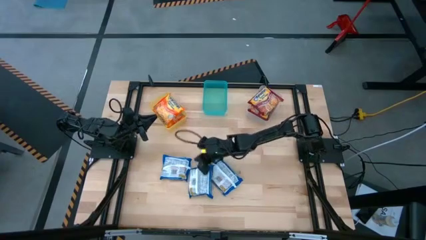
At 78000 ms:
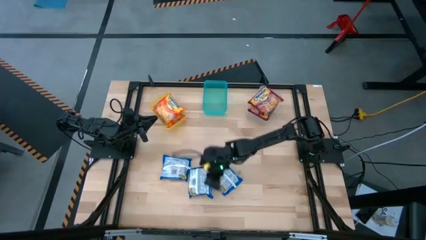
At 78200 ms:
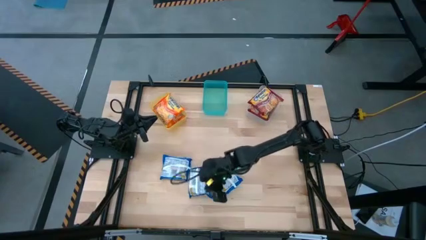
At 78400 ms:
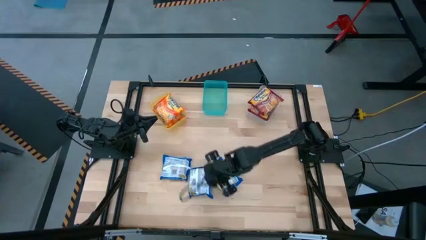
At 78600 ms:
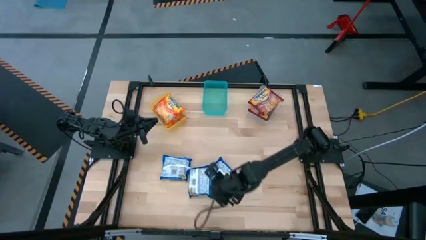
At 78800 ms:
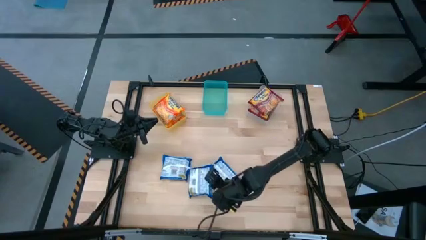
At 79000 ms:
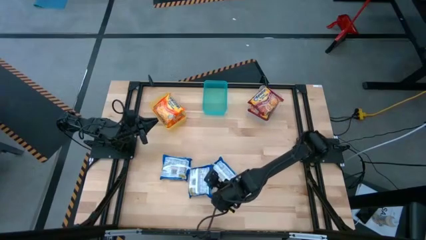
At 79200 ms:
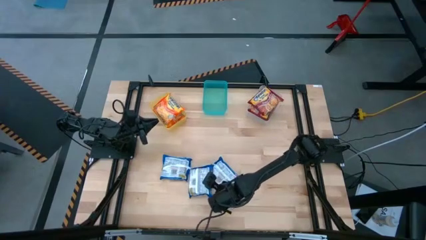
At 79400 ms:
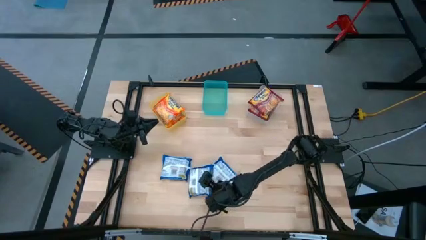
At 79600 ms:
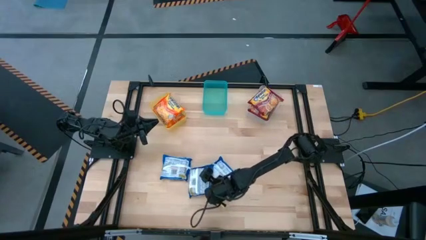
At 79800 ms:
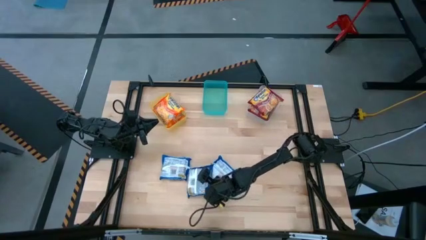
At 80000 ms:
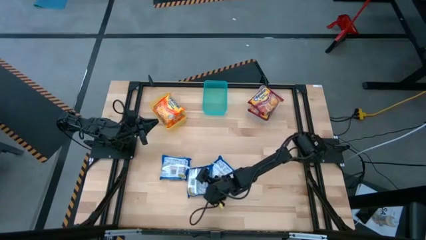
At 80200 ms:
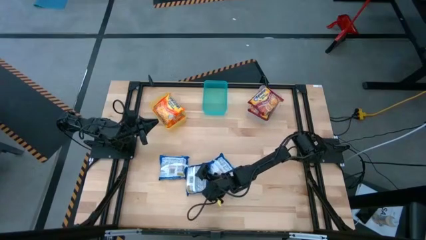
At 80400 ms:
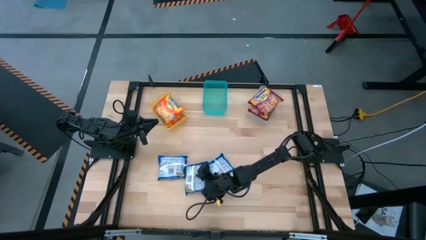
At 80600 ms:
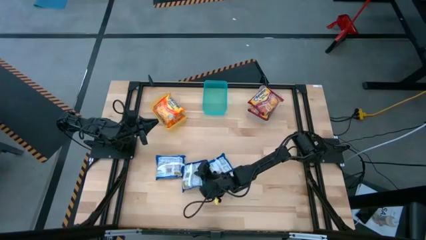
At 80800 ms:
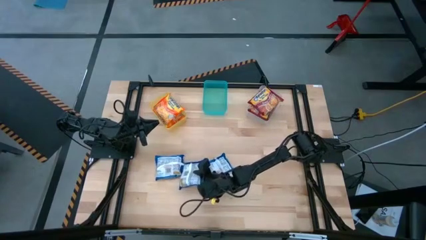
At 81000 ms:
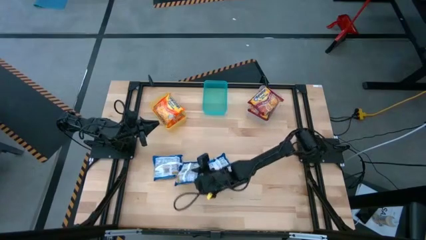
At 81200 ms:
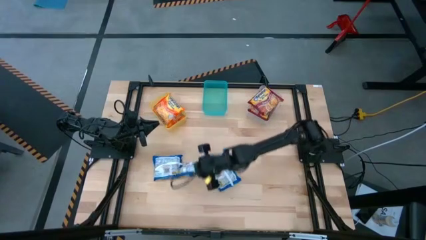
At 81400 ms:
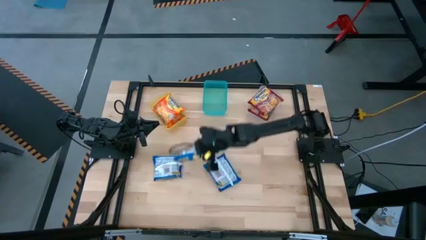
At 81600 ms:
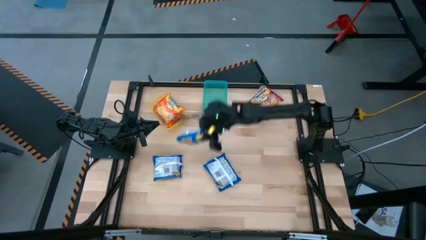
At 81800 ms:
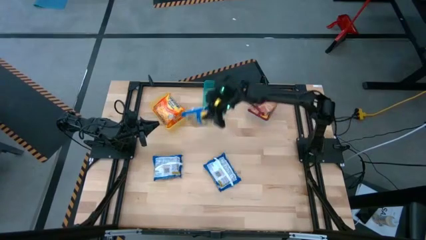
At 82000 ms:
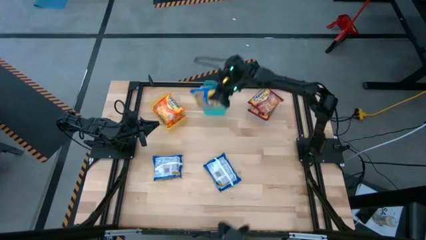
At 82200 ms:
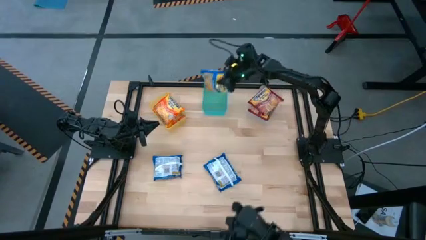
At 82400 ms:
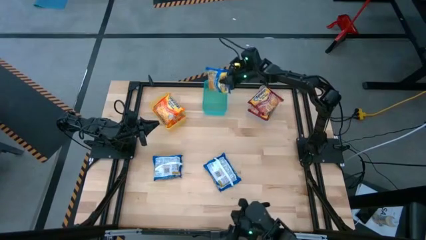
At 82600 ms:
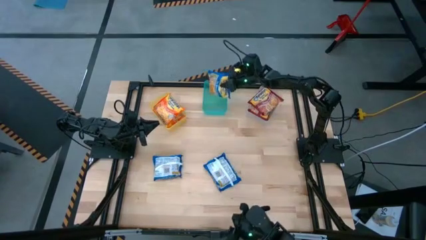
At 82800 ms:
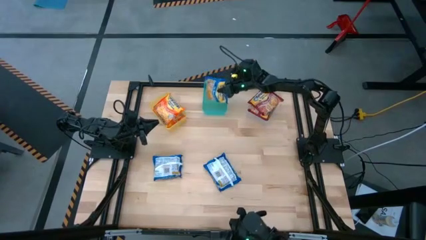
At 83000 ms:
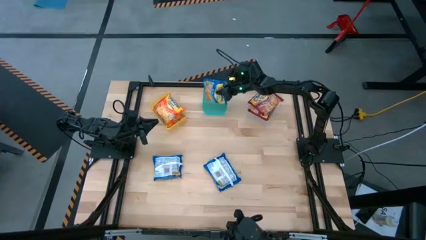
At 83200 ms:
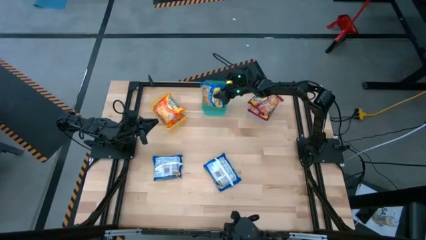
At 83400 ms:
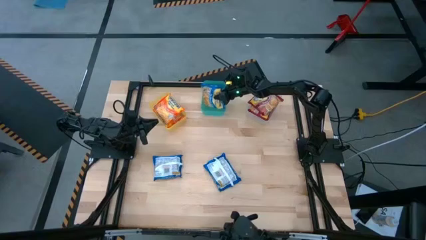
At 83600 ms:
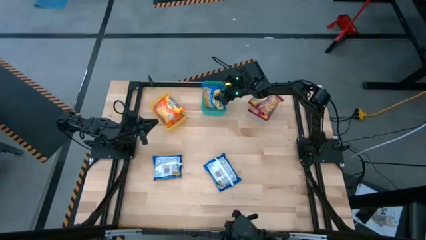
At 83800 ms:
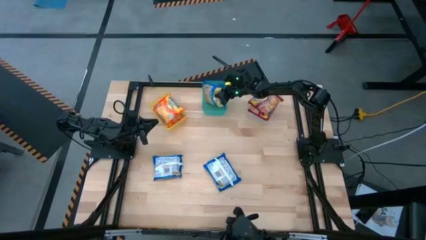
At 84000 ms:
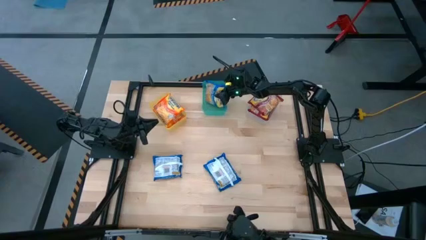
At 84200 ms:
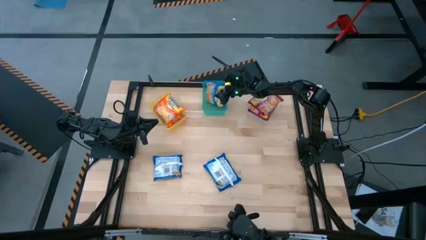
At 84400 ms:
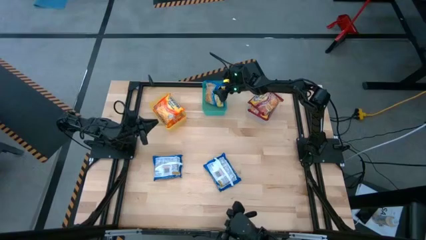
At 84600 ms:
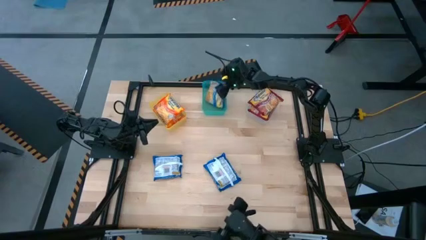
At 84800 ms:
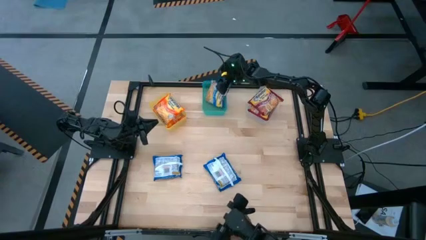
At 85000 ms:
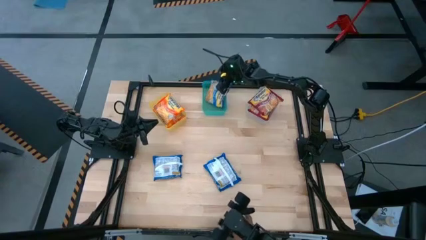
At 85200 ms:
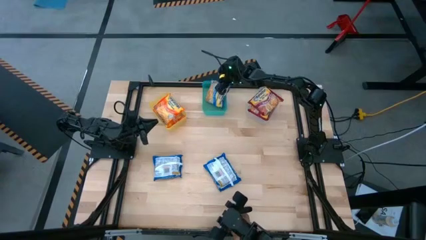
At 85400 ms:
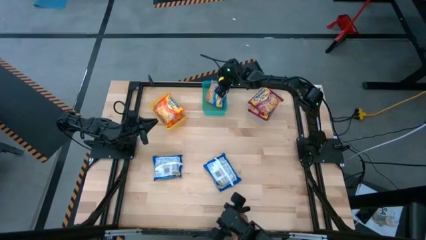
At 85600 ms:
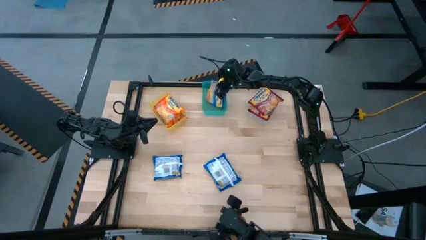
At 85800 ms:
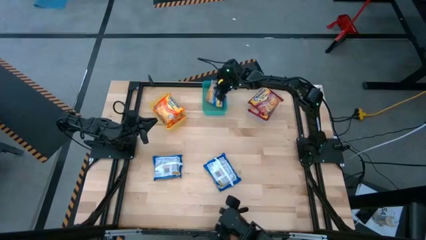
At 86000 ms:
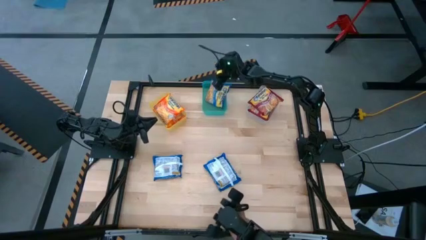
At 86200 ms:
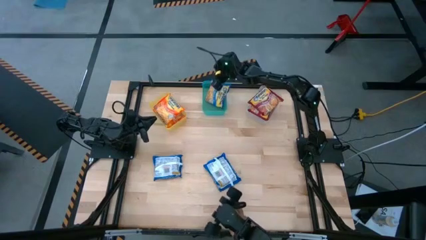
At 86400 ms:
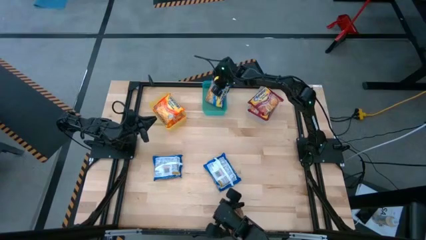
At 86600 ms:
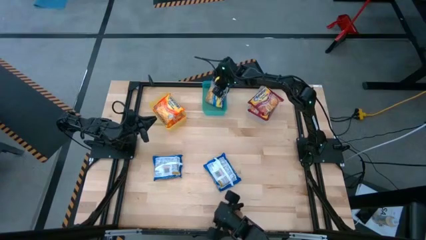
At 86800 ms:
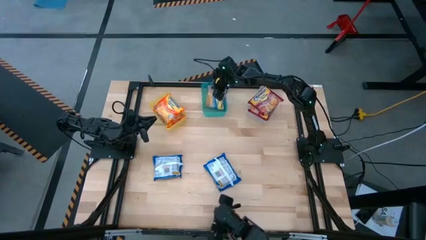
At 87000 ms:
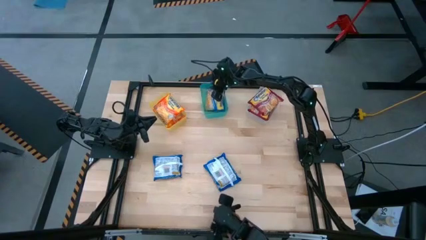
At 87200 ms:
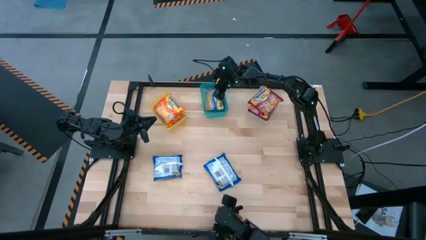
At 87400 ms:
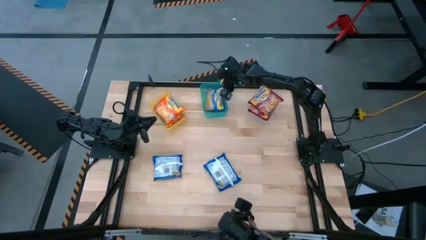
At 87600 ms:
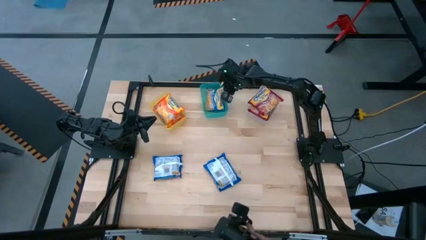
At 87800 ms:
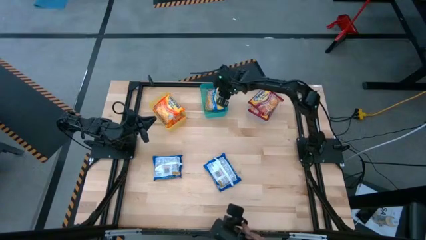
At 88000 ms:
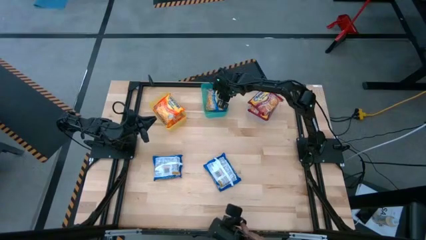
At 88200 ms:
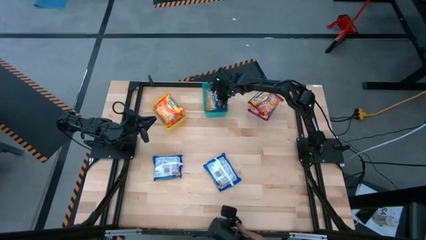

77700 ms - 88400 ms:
Task: Sort Maruchan noodles
Put the middle blue noodle pack into the green bin

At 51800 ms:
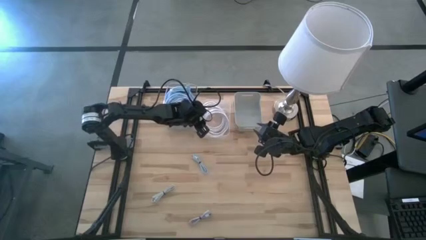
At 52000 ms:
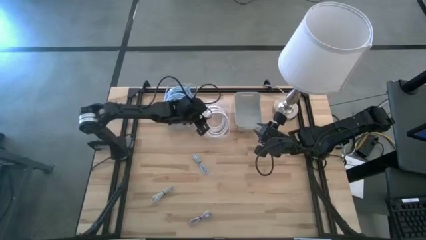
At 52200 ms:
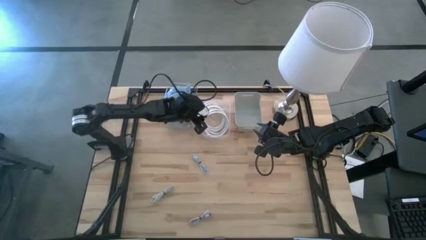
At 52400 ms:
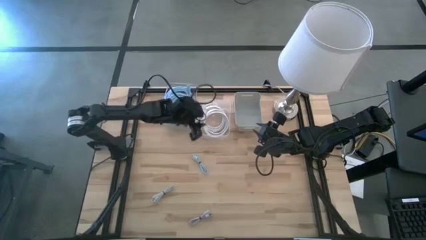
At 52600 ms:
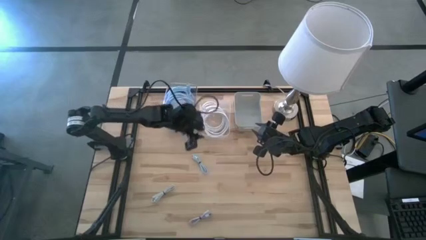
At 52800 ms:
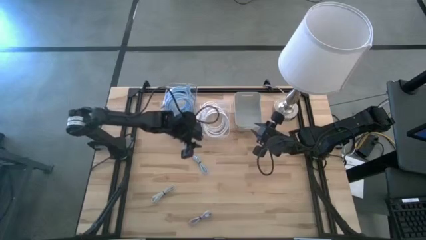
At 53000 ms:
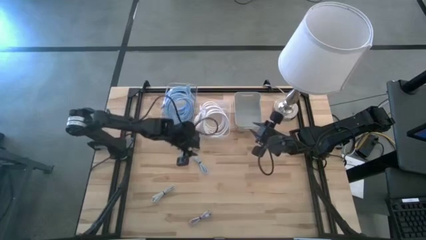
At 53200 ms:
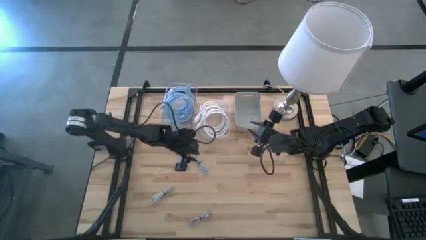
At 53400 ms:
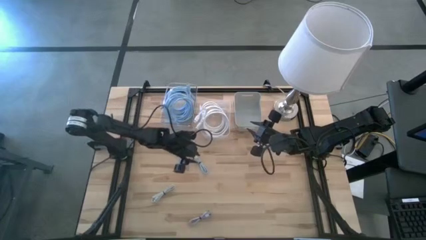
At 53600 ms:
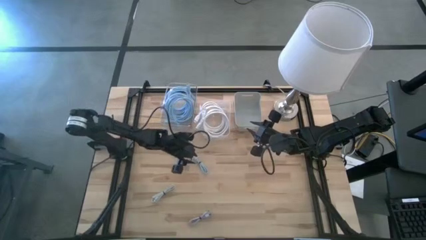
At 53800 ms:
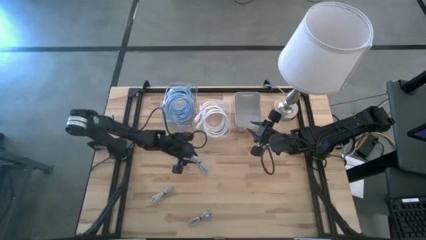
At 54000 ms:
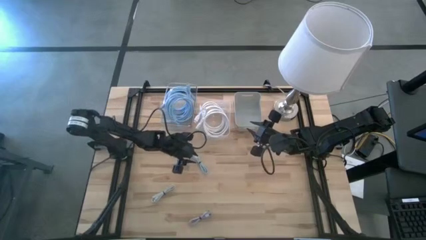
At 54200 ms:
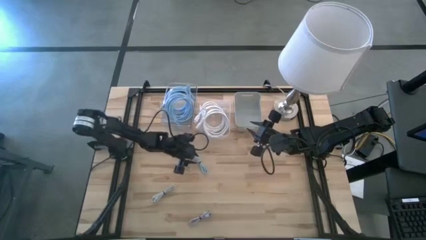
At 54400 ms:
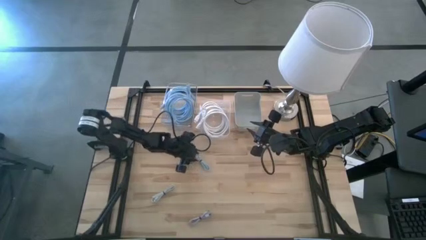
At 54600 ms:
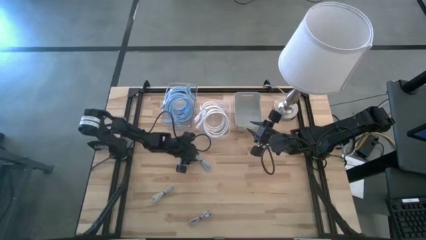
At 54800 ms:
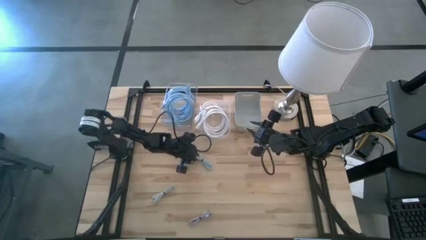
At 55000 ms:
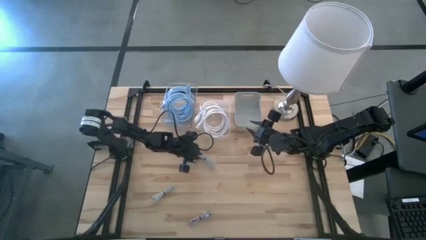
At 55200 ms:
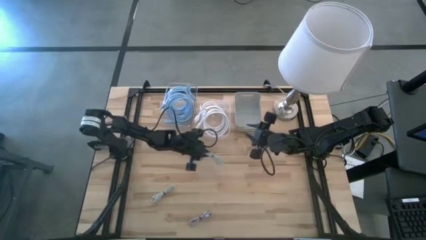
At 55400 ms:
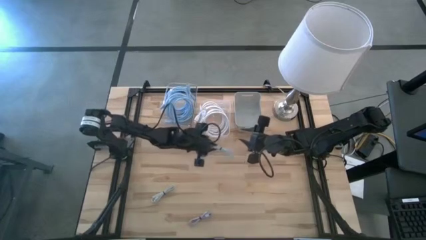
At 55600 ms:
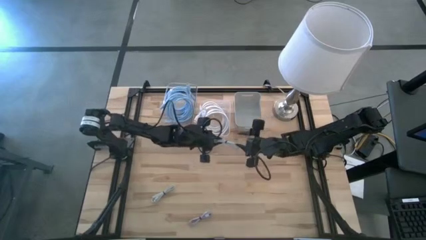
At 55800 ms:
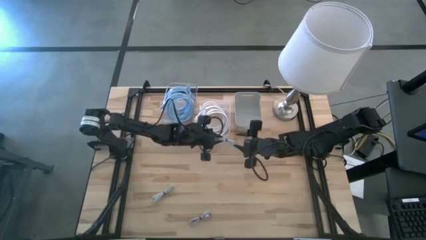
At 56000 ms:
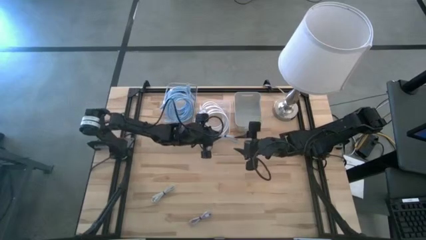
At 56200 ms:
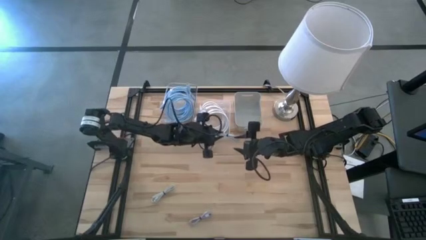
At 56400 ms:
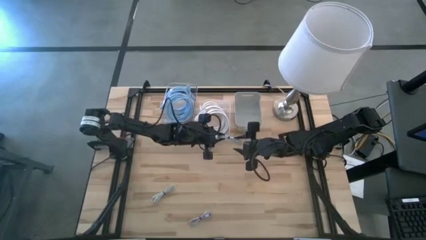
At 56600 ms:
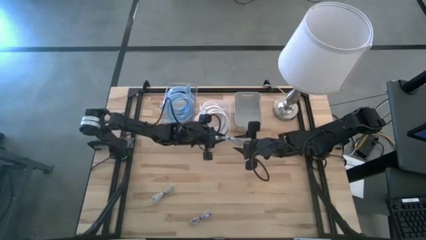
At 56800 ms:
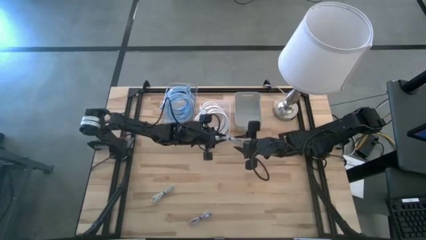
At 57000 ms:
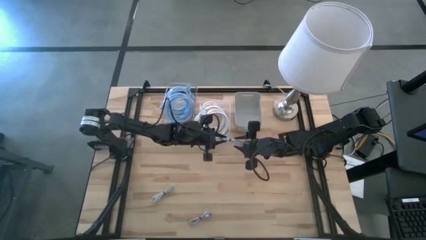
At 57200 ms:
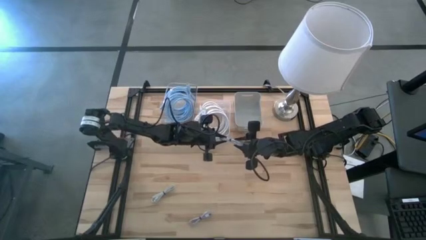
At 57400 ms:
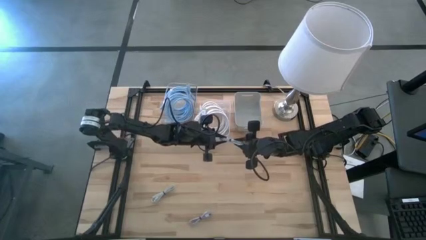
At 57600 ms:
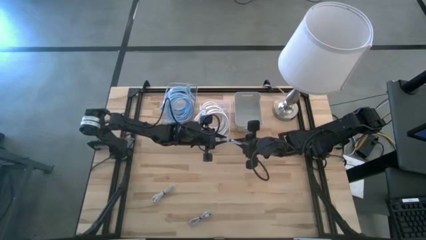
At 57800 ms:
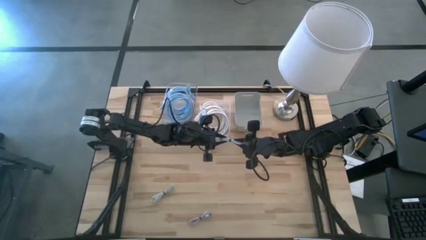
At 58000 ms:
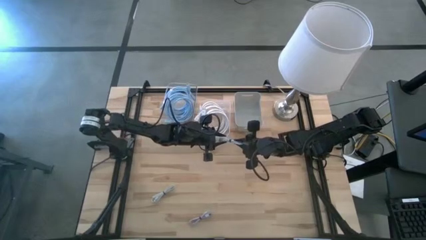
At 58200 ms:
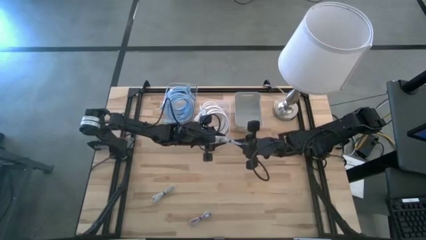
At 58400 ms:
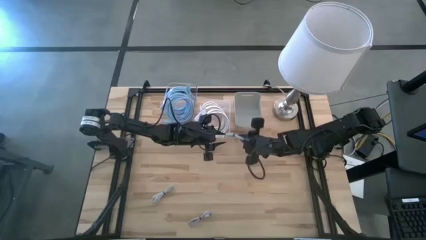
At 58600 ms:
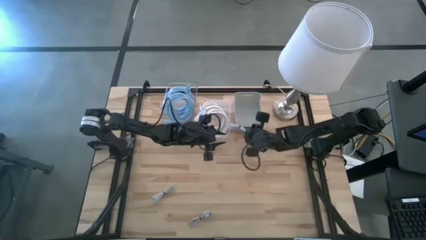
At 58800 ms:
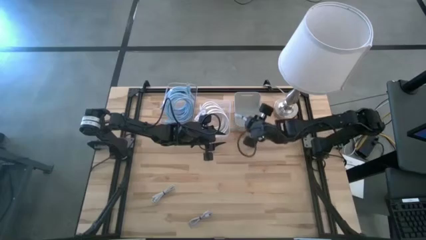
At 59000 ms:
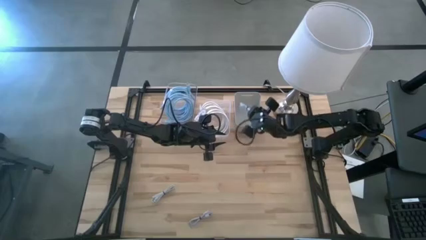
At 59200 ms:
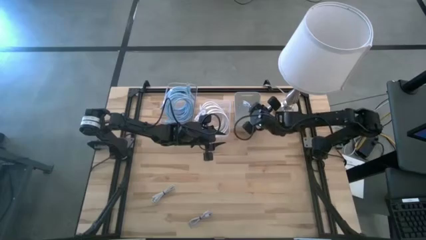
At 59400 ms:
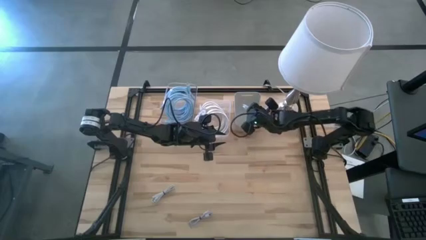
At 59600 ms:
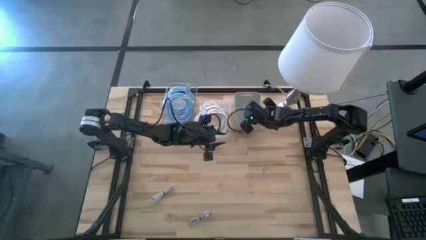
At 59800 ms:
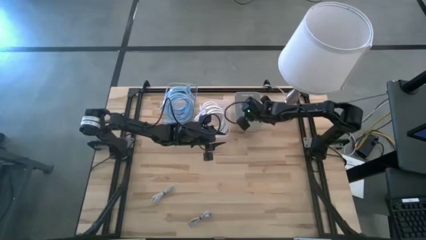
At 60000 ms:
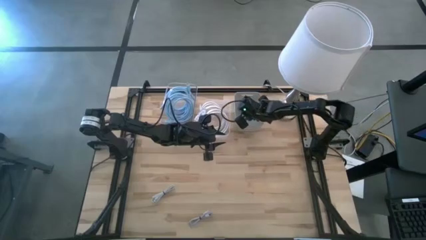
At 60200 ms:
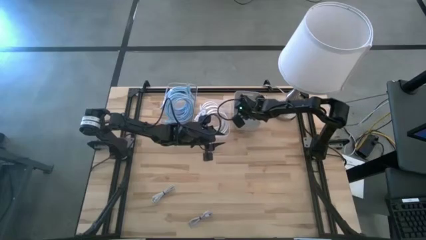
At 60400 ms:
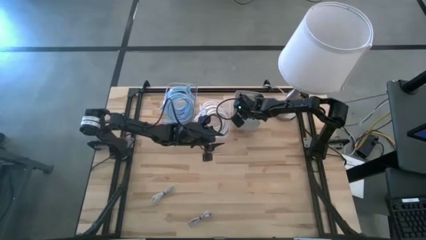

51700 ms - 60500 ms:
Task: Pick & Place USB Port
Put the blue charger cable into the white bin
